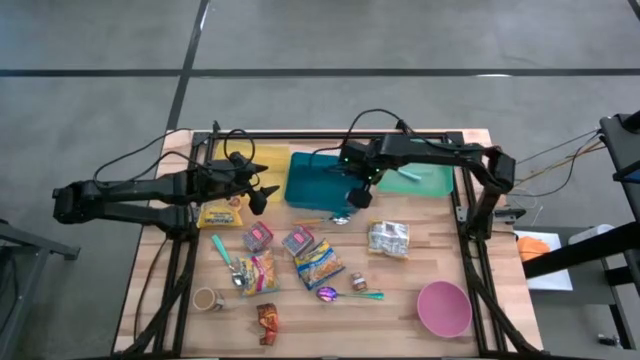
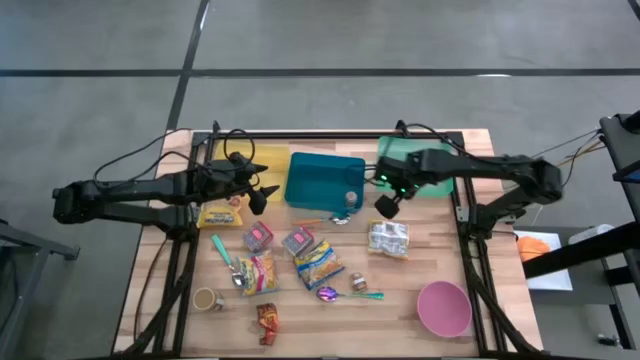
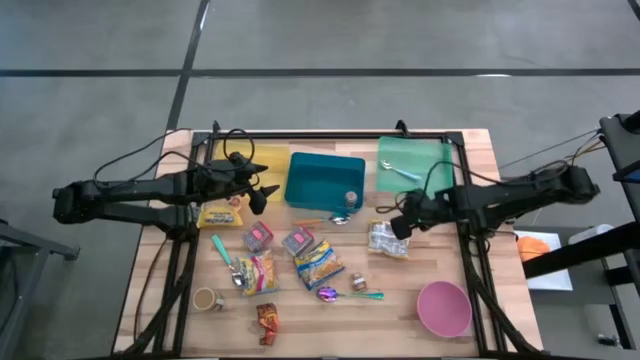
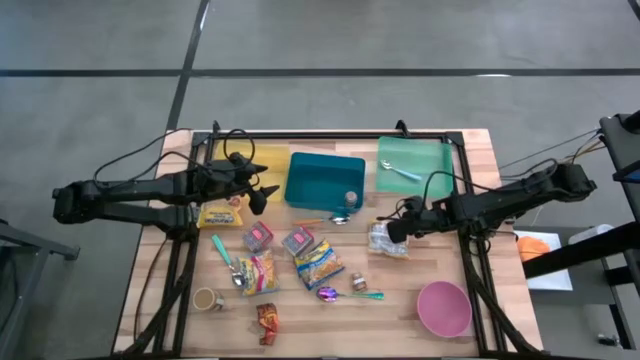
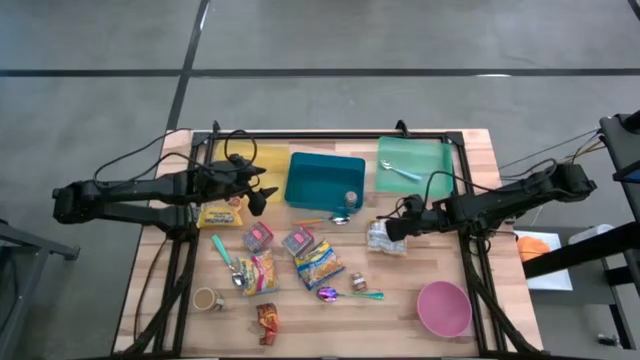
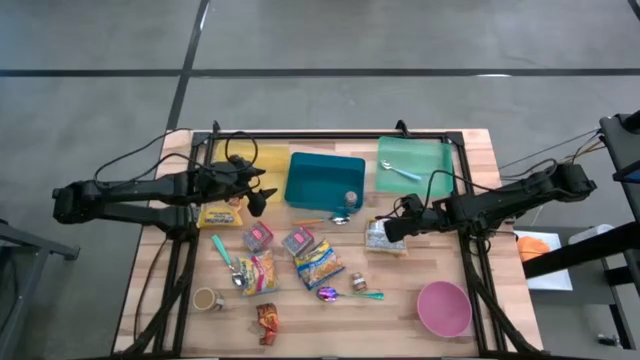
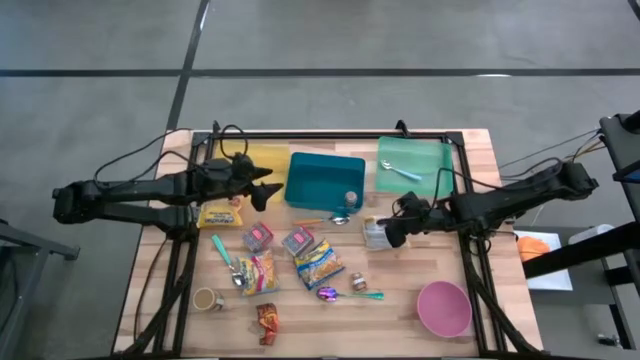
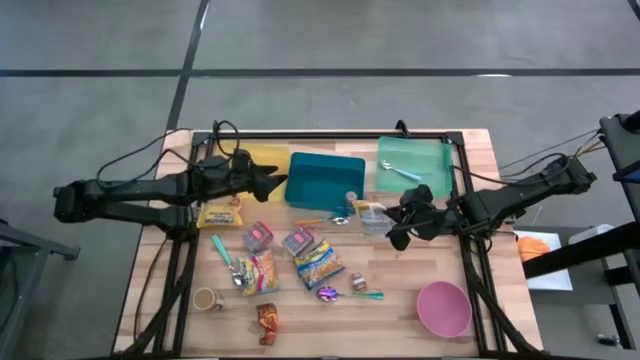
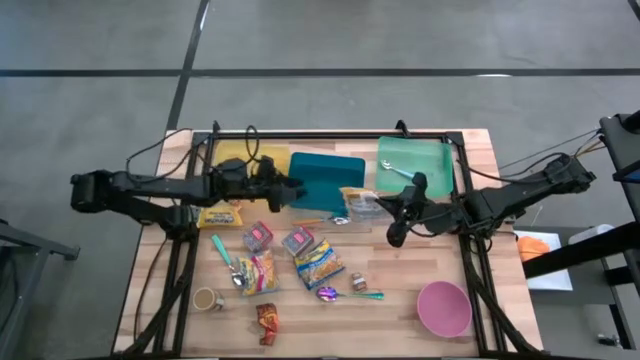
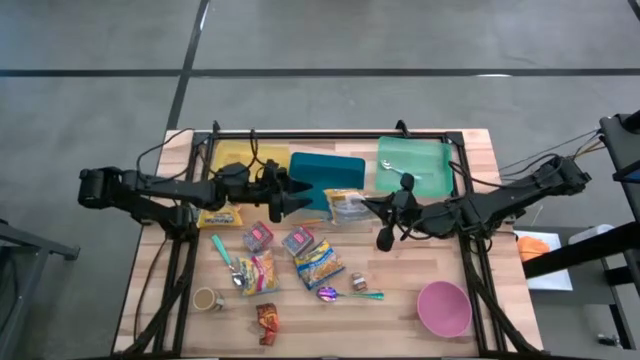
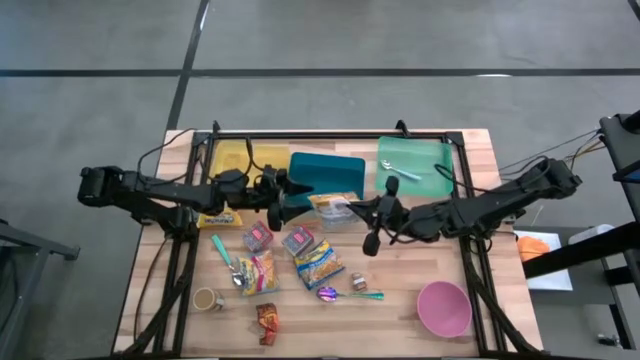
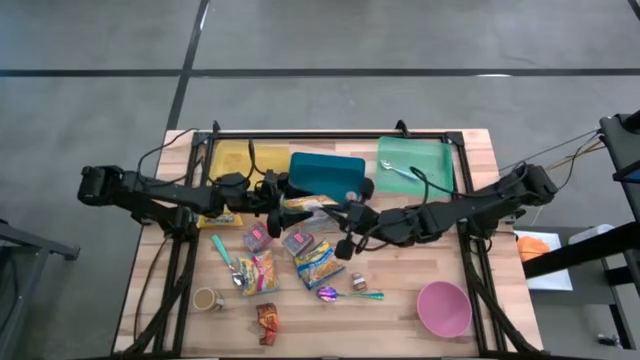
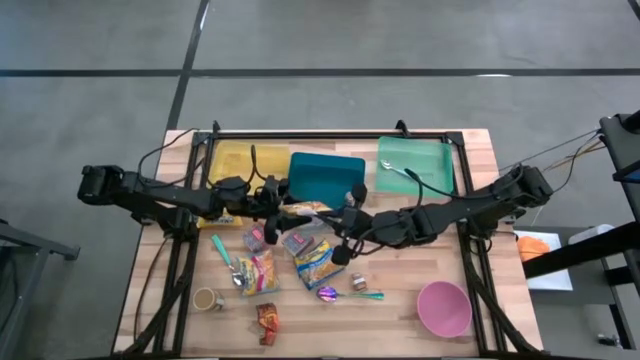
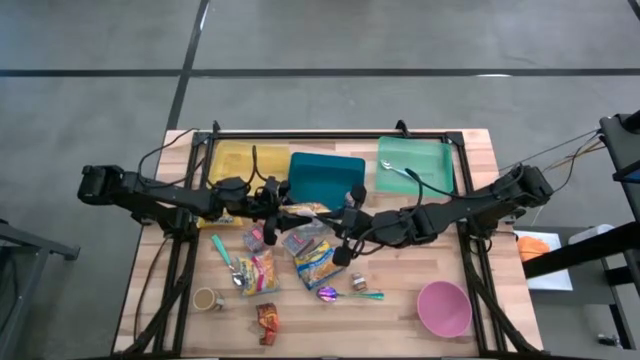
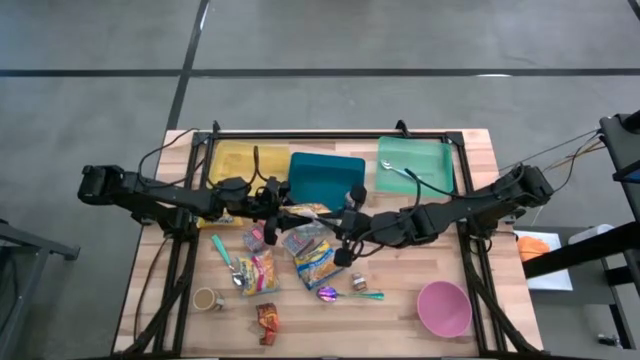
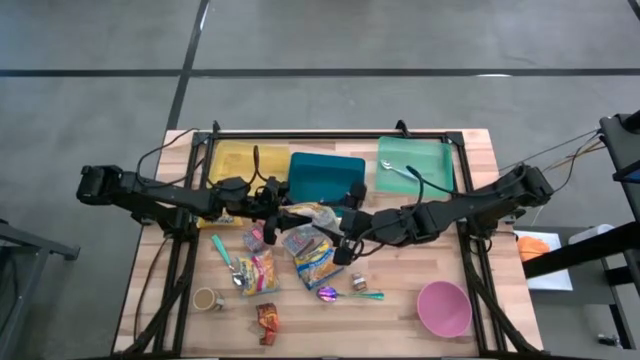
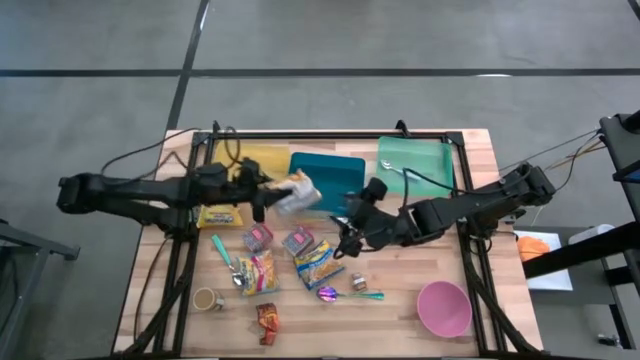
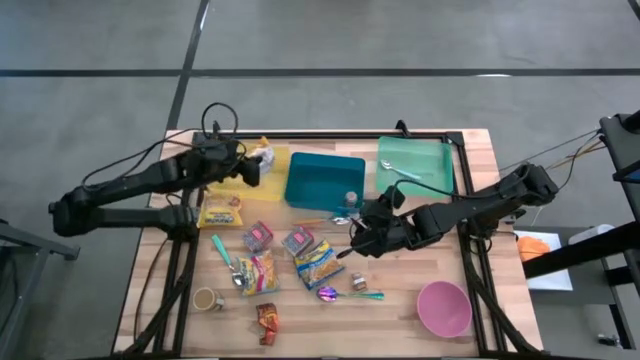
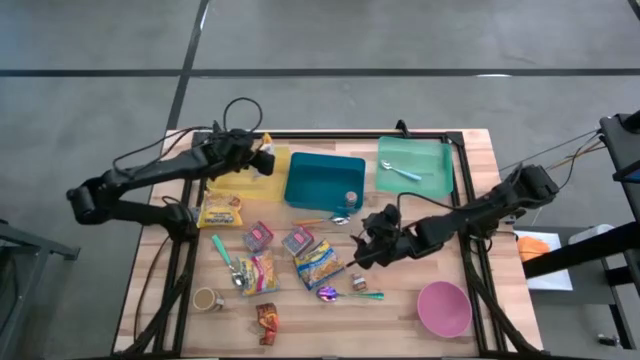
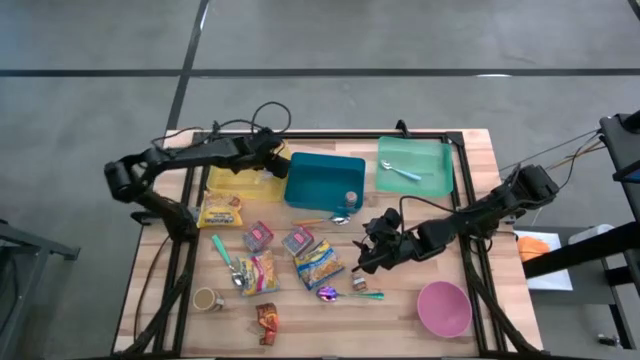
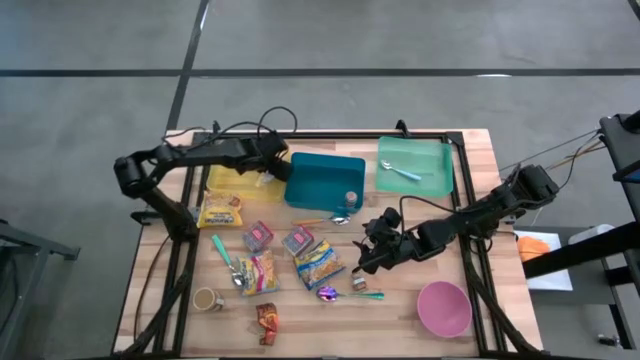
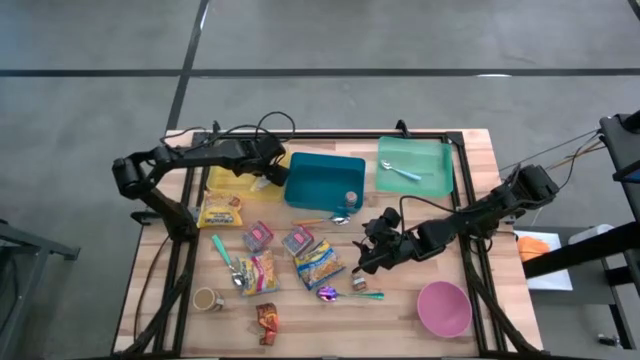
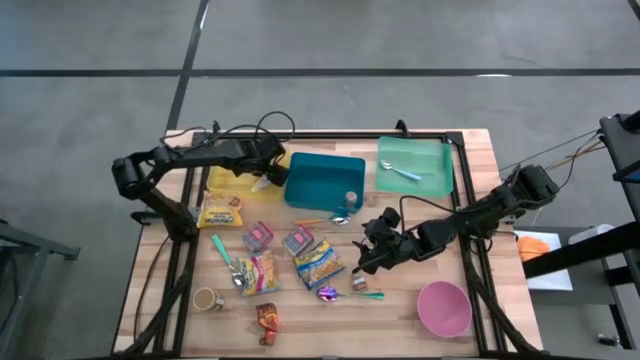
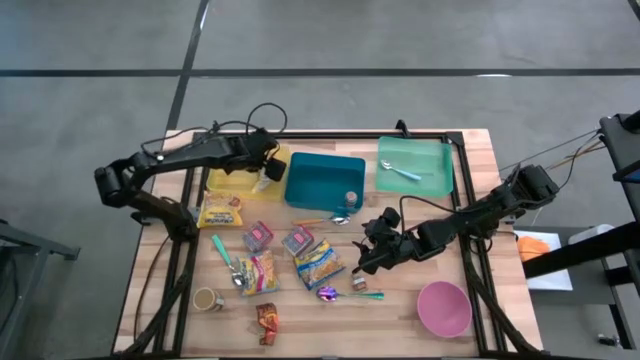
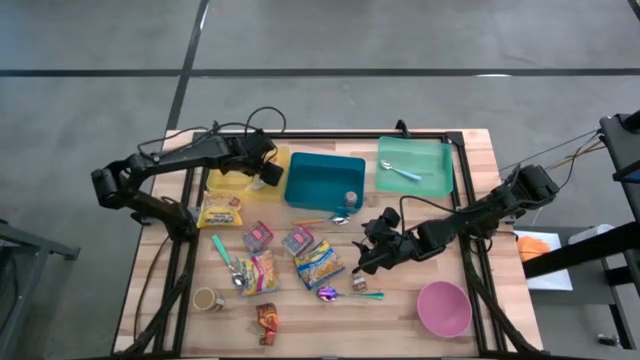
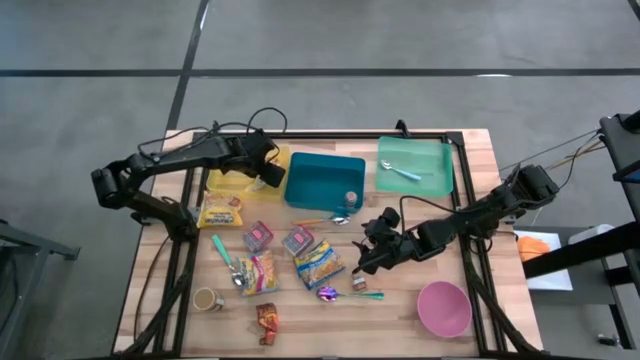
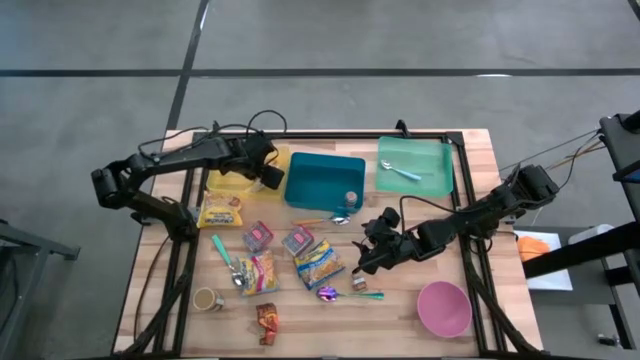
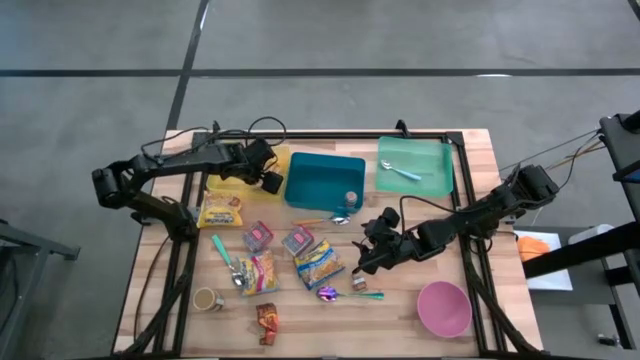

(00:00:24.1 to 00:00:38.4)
Put the right yellow noodle pack into the yellow bin

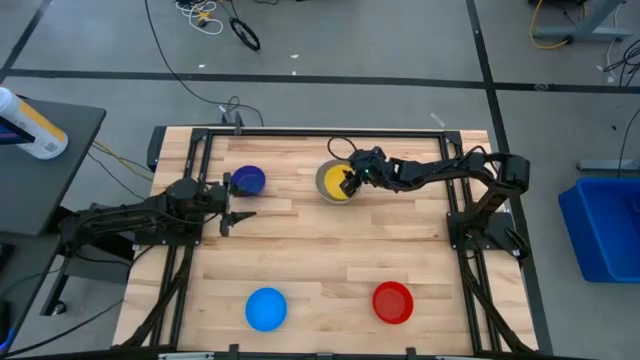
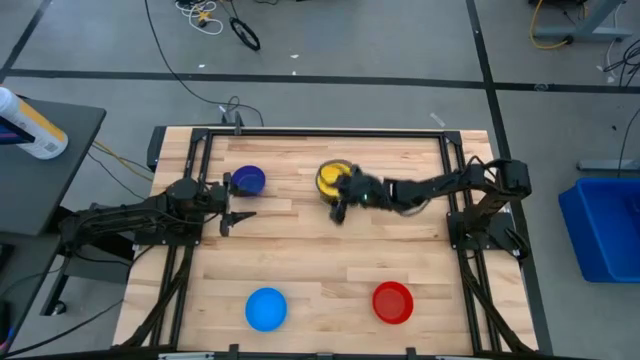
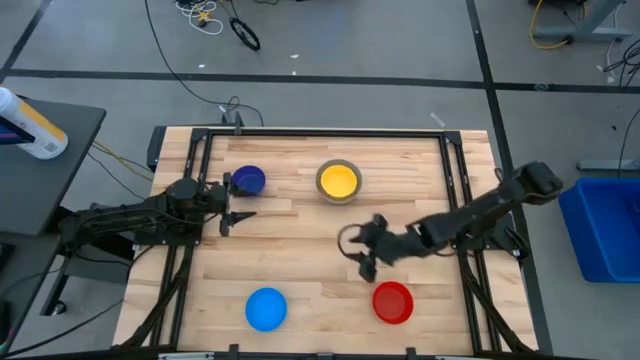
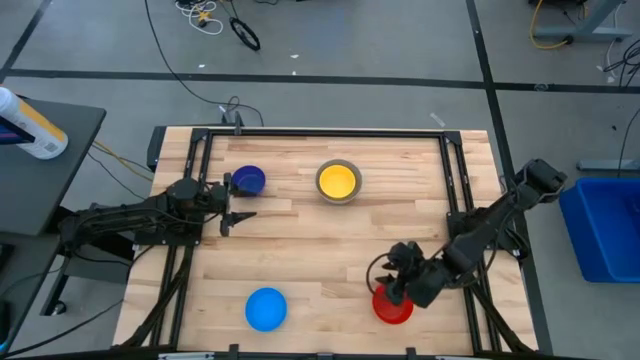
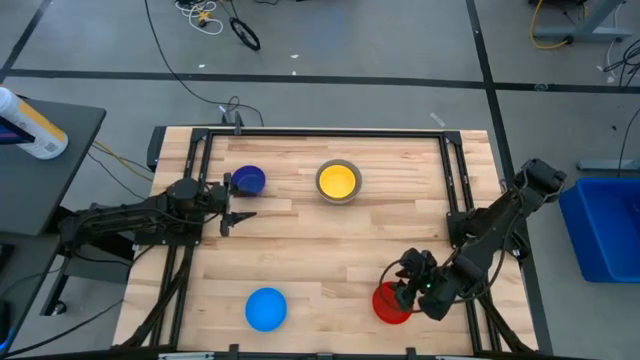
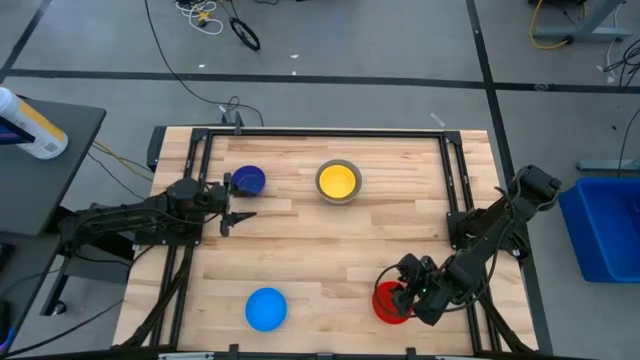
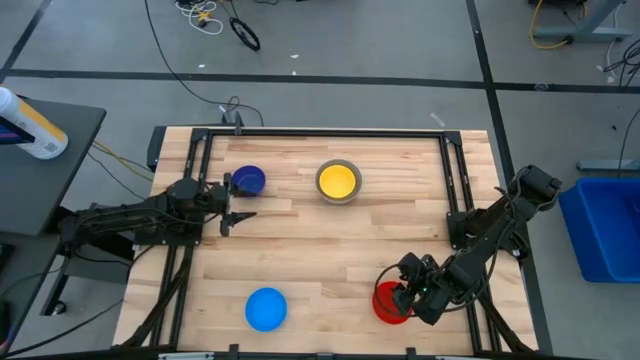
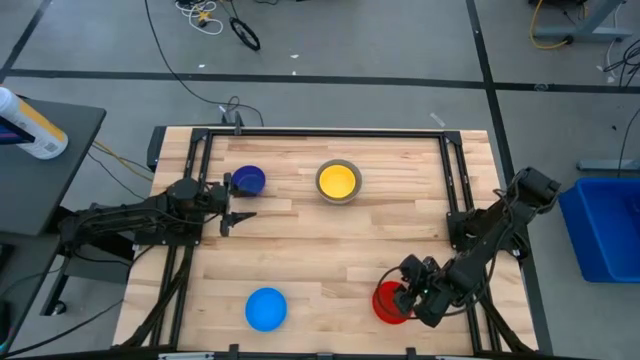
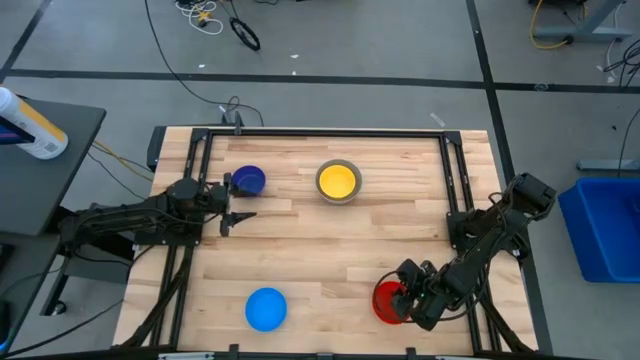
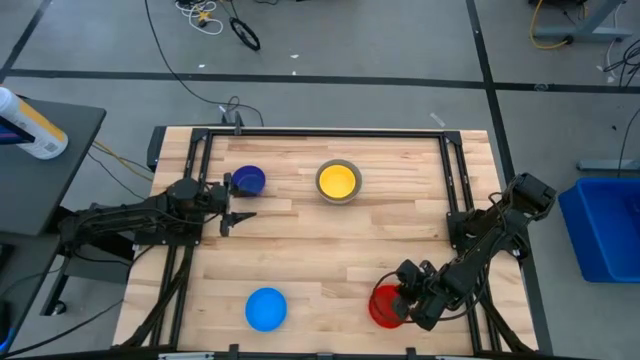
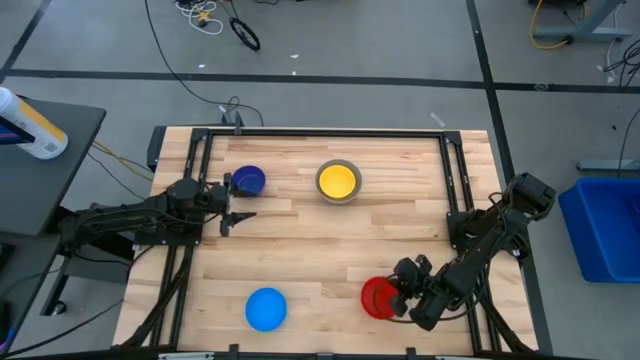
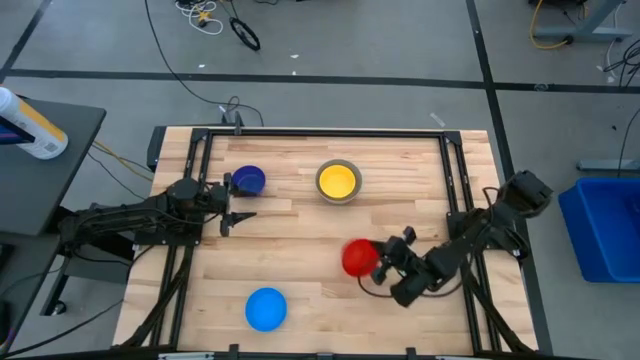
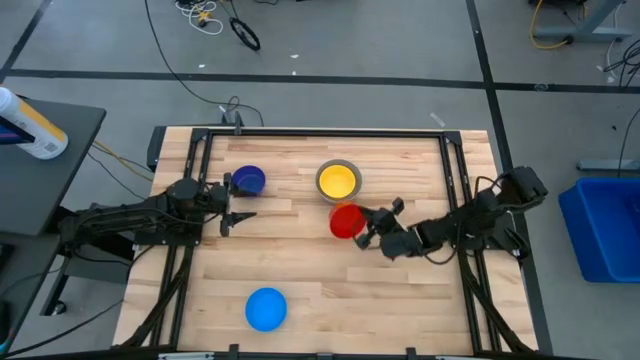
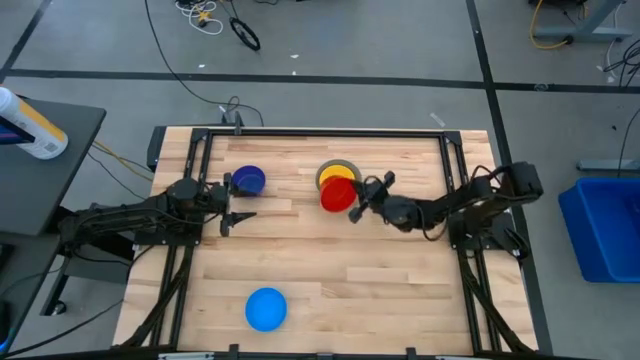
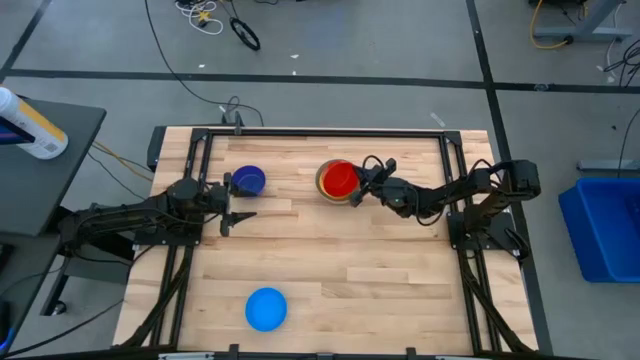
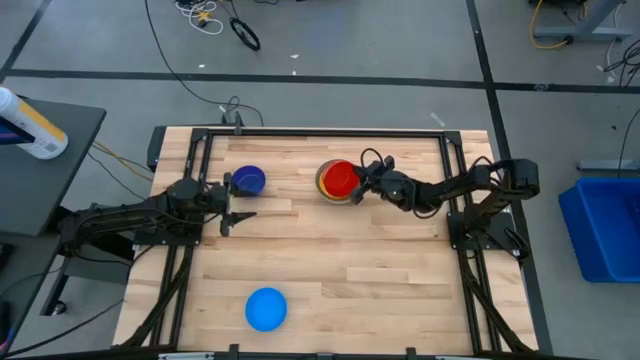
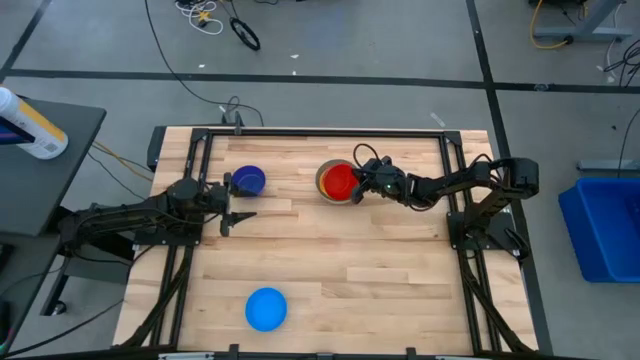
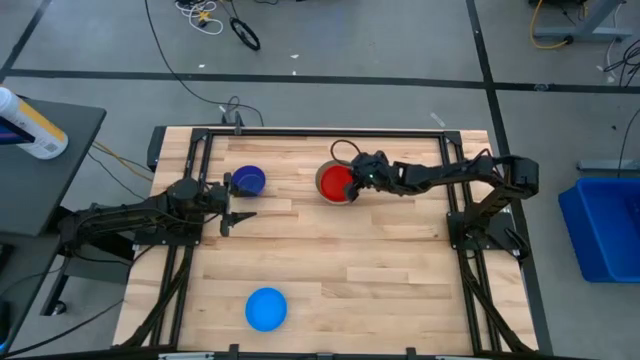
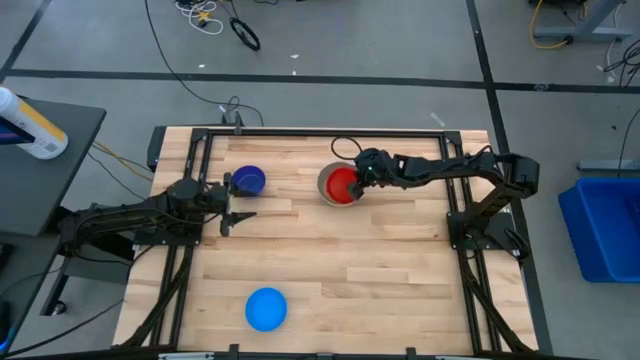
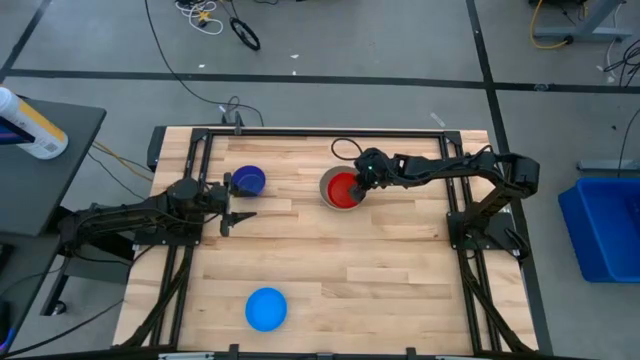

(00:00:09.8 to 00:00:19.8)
Stack the red bowl on top of the yellow bowl
